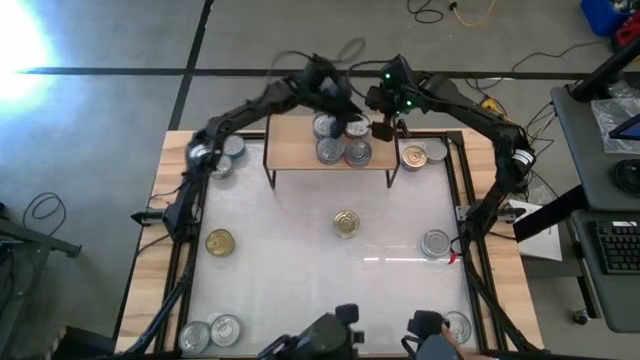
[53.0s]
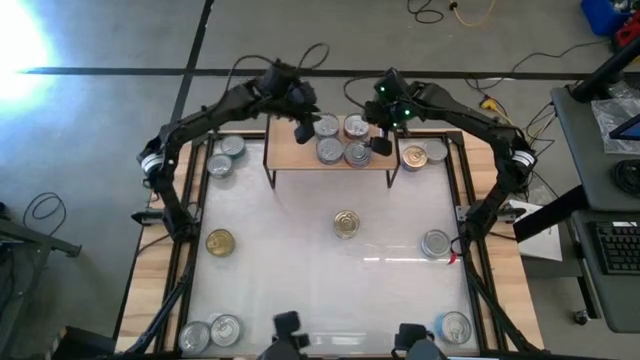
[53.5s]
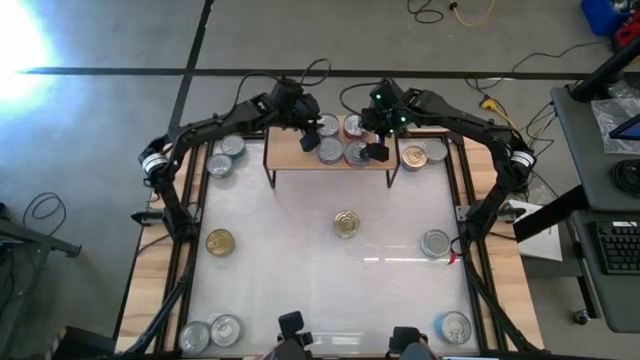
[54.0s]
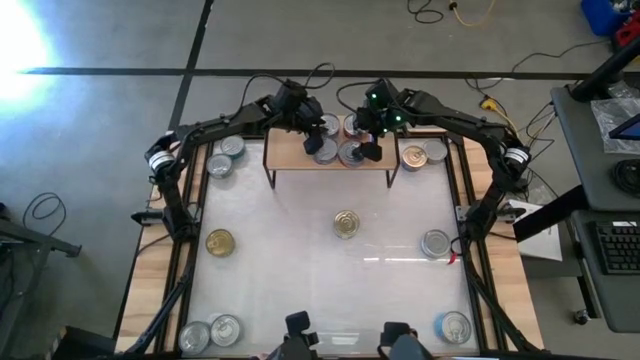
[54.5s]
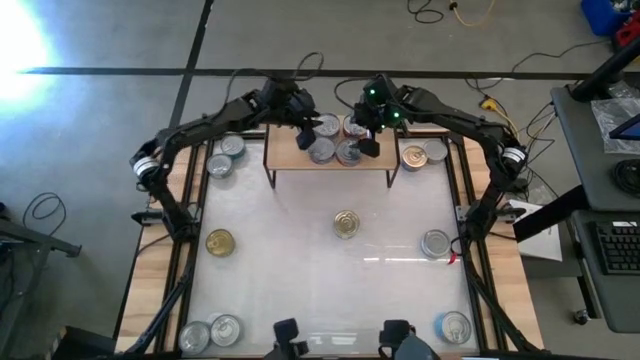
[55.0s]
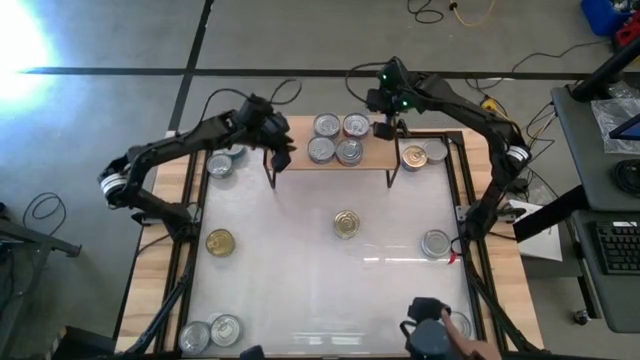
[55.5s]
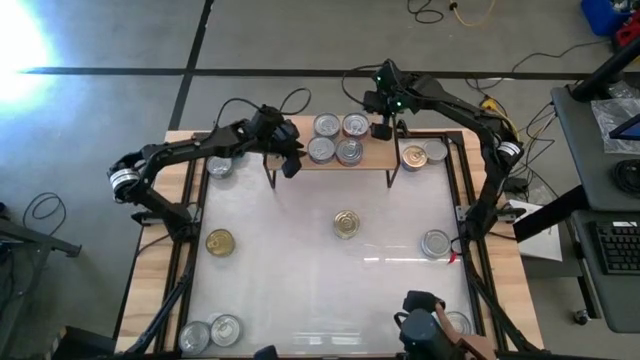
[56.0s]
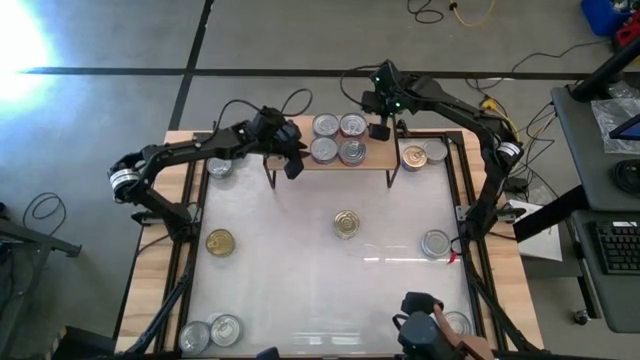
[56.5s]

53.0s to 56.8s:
Task: Stack canned seafood by type on shelf
Adjust the tuna cans on the shelf

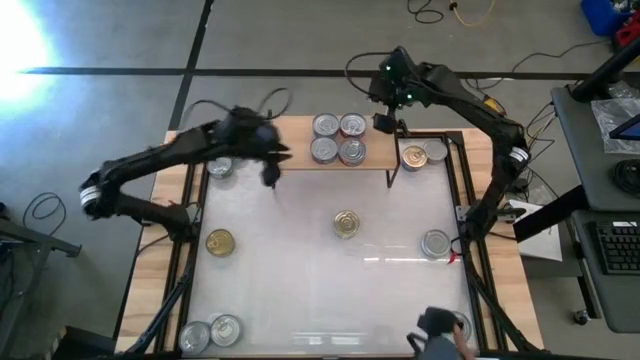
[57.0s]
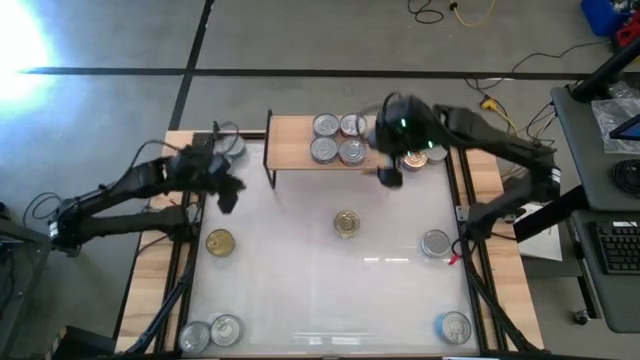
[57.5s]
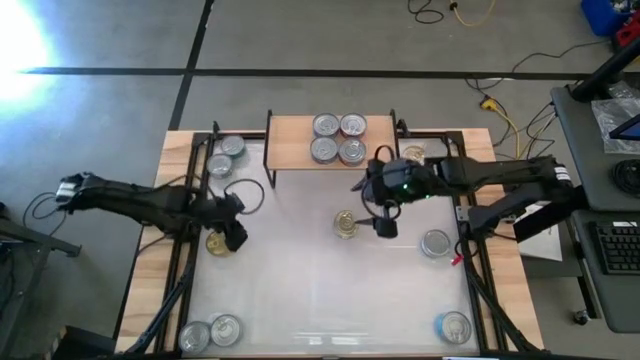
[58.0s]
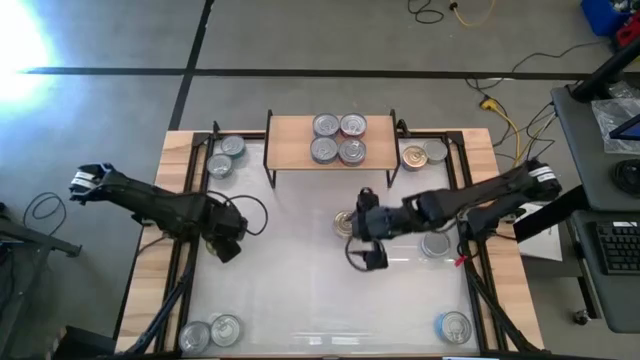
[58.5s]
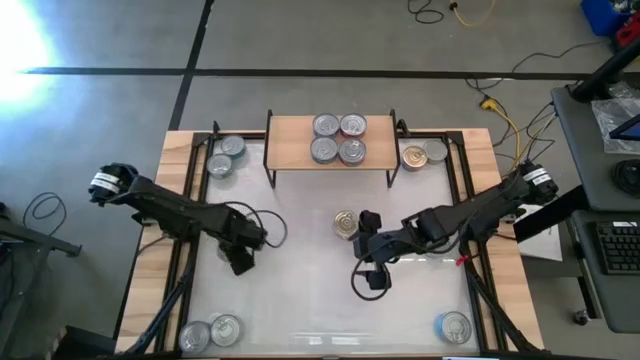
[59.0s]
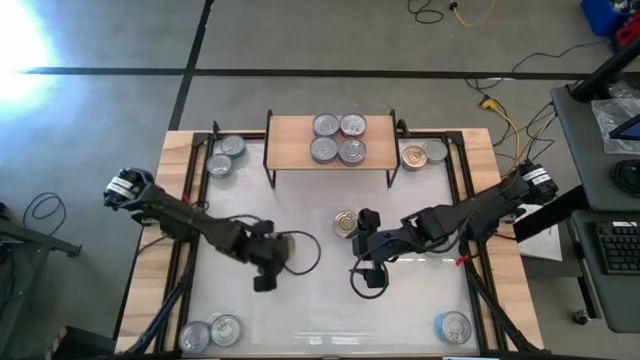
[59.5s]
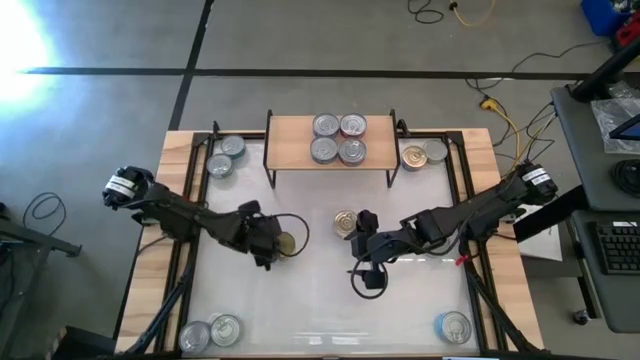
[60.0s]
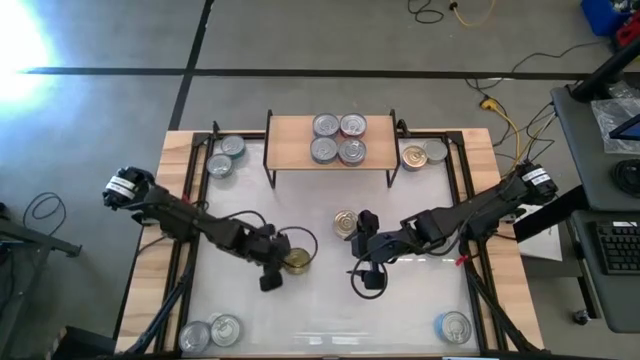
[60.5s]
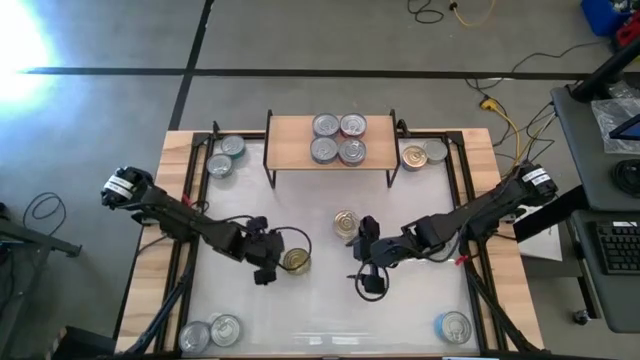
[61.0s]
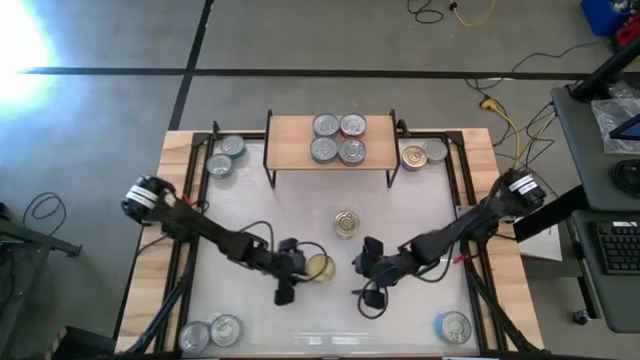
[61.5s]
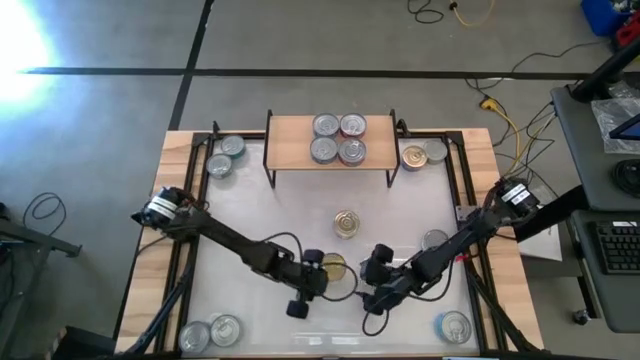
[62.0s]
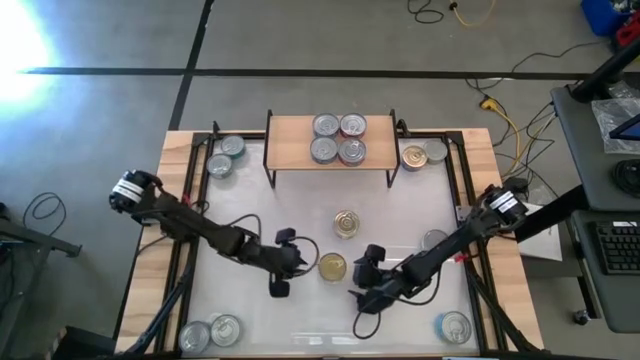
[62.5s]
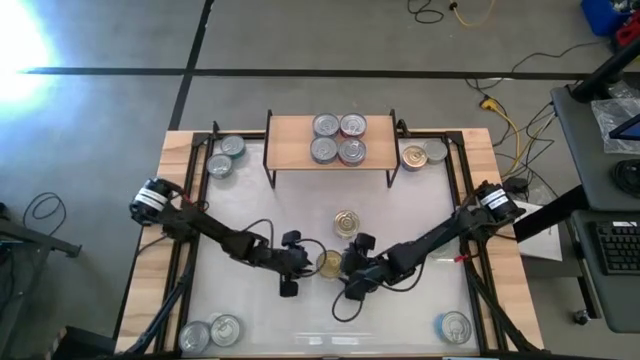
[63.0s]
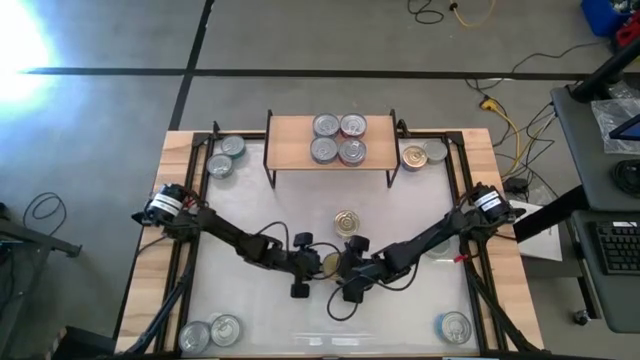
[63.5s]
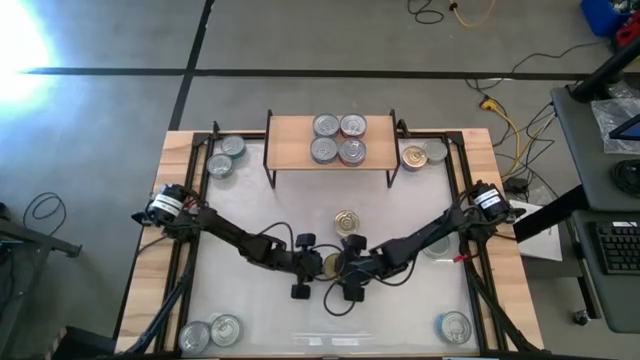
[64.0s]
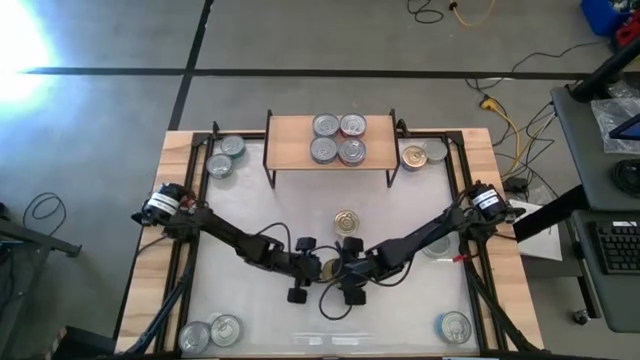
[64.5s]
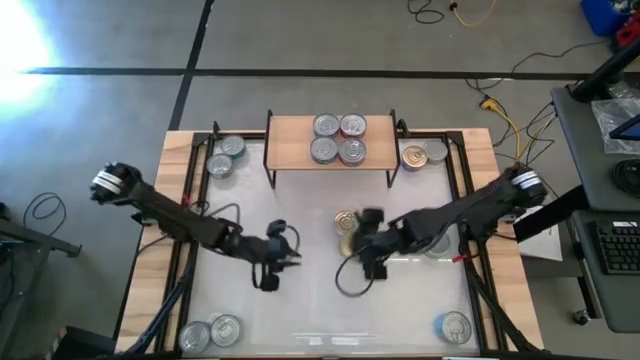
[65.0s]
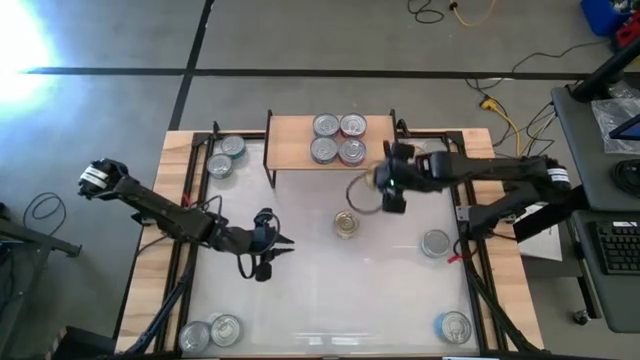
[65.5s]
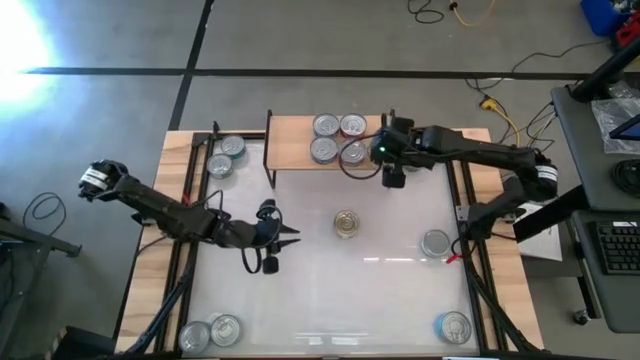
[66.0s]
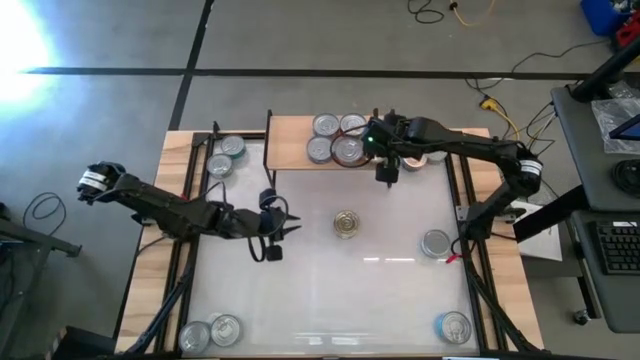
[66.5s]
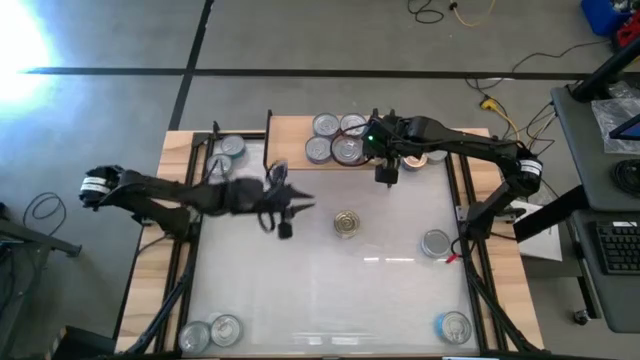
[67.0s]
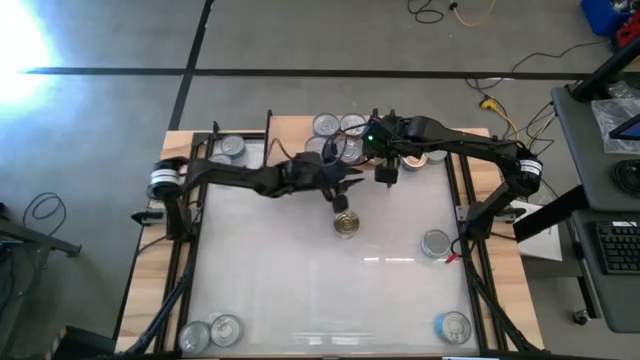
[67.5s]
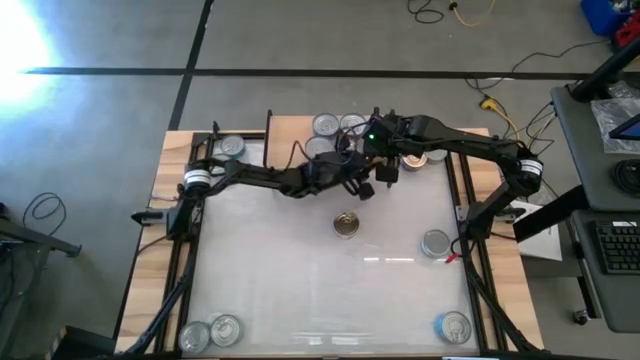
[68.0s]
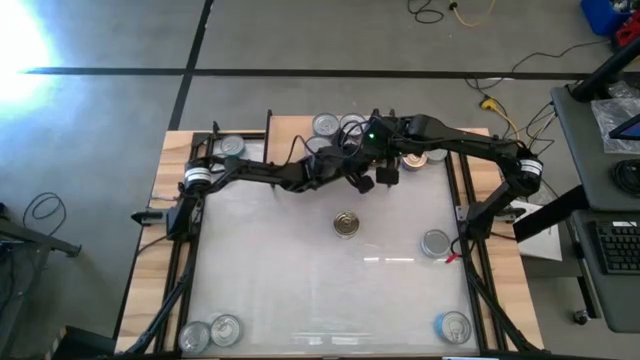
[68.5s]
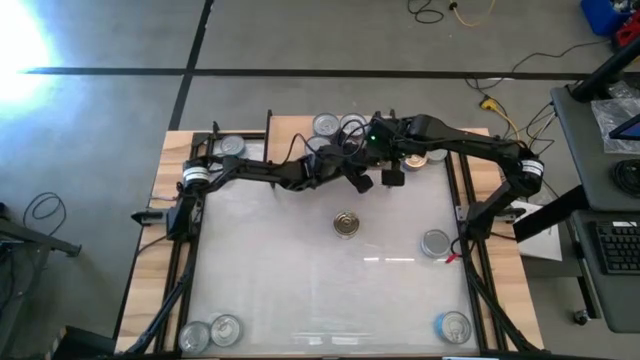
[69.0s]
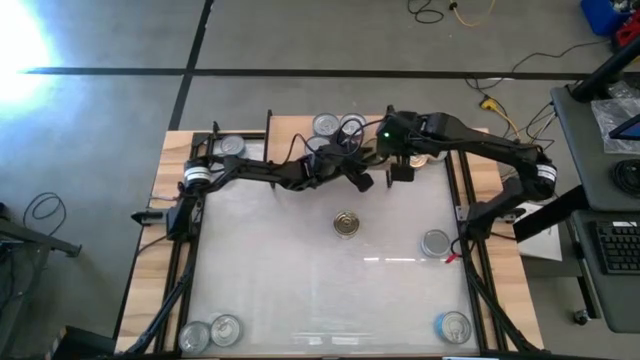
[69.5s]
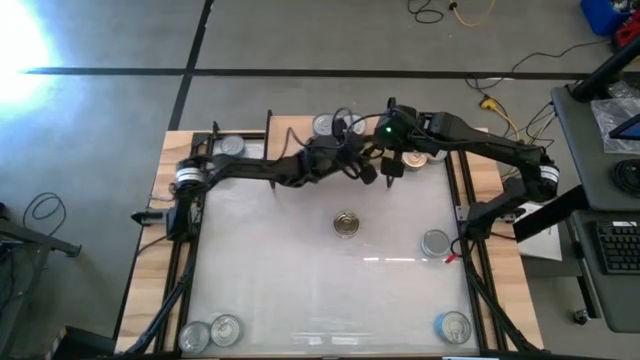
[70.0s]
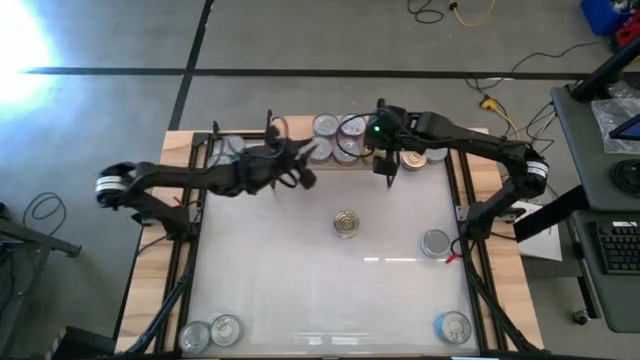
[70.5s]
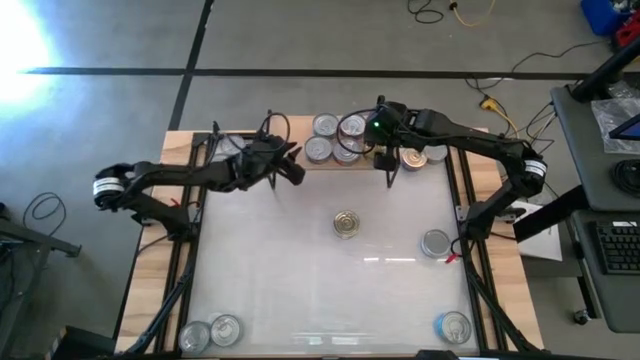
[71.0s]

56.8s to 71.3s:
Put the bottom left green tuna can on the shelf

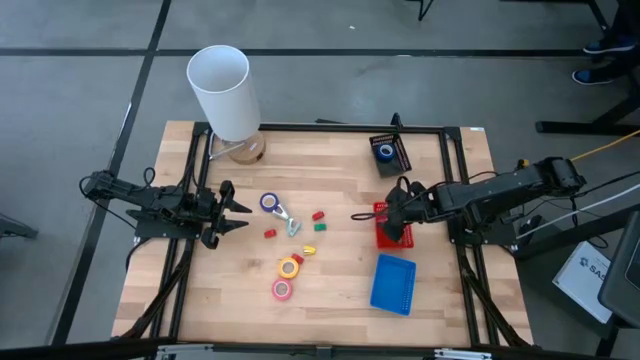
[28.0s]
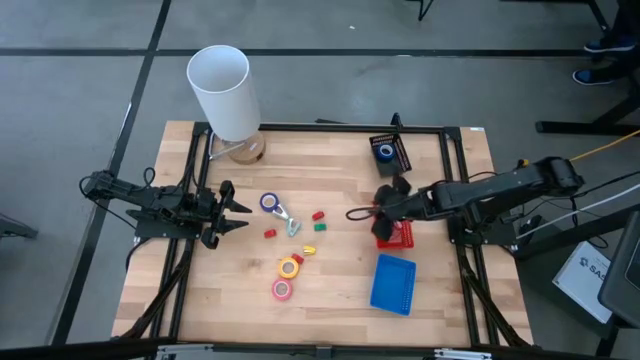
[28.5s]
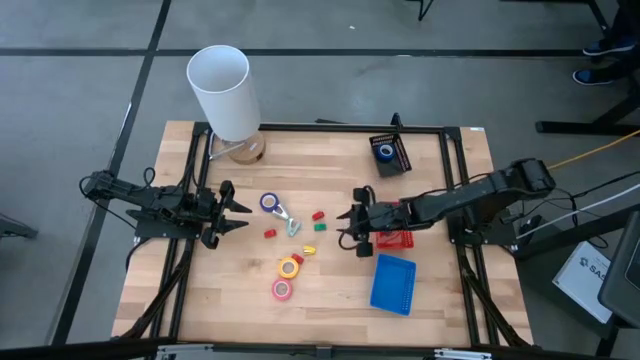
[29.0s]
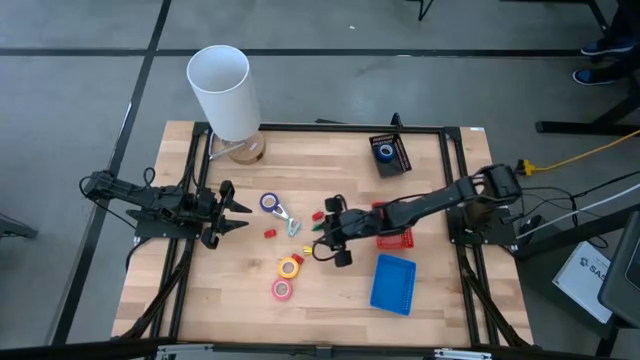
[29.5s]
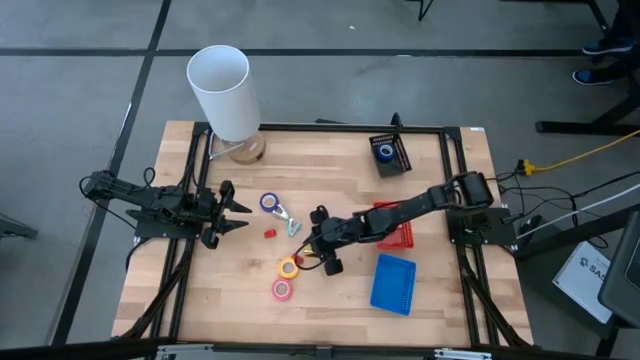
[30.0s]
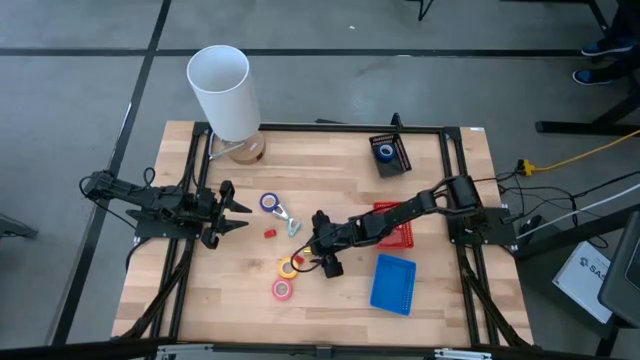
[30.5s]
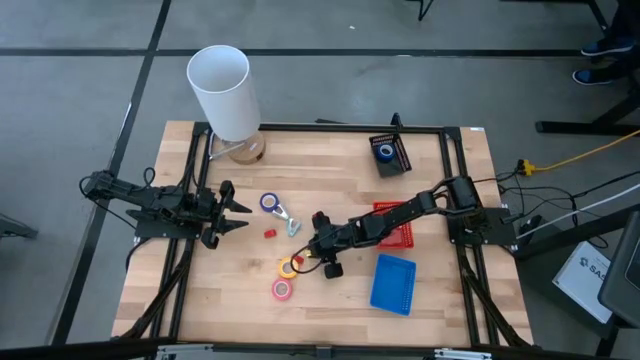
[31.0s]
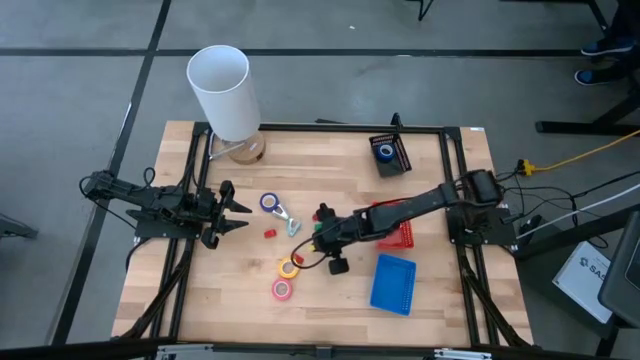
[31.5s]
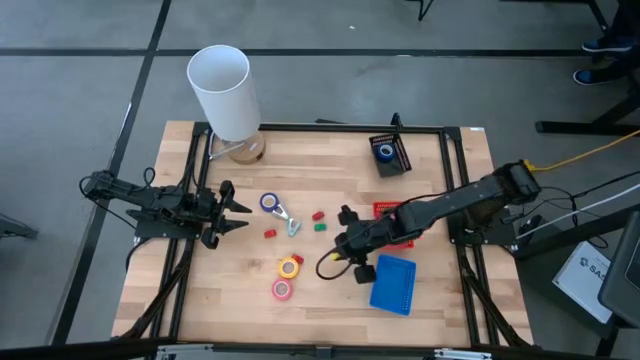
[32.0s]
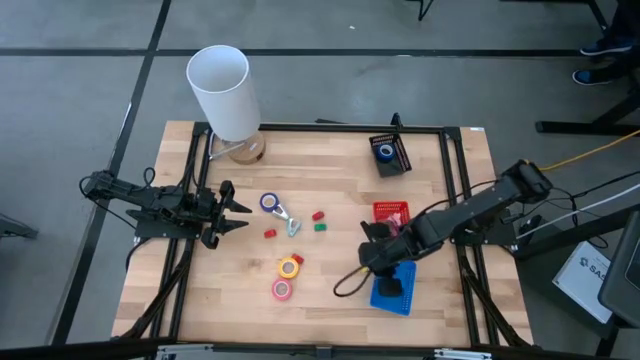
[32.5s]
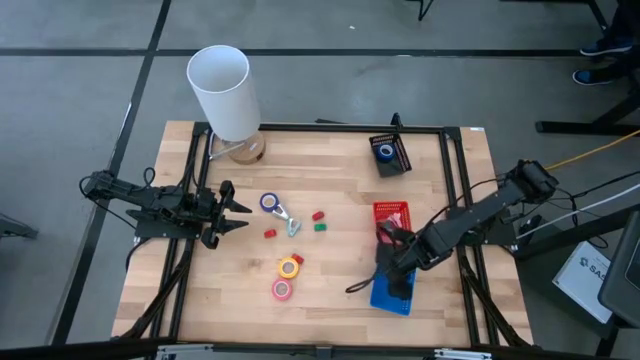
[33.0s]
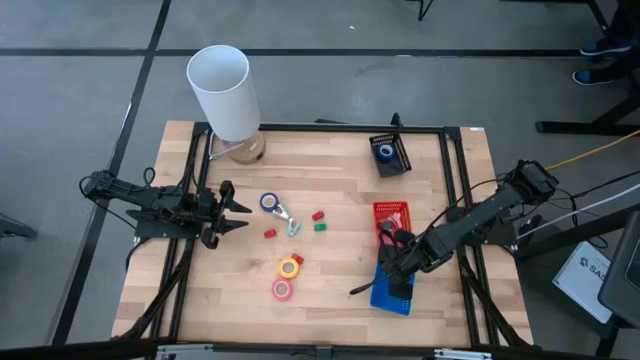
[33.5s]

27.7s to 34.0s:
Task: Pick and place Stapler, Stapler remover, tape
Put the yellow stapler into the blue basket
